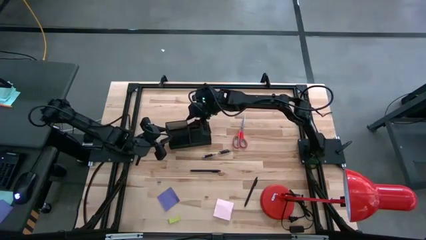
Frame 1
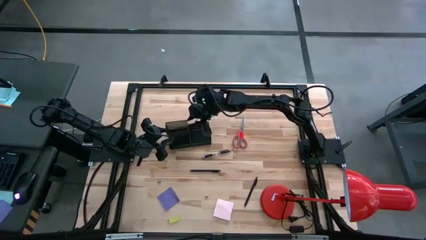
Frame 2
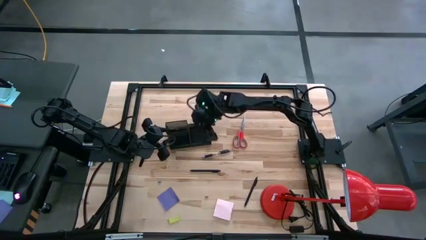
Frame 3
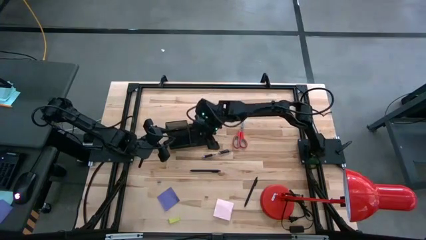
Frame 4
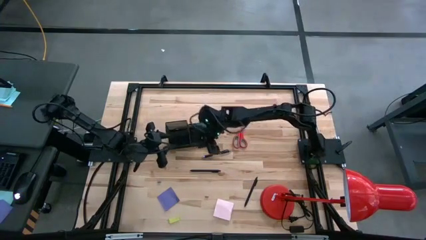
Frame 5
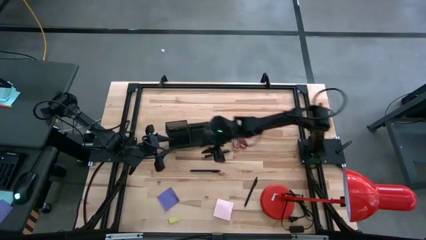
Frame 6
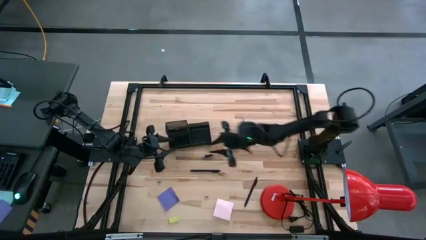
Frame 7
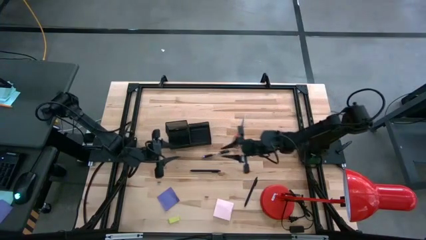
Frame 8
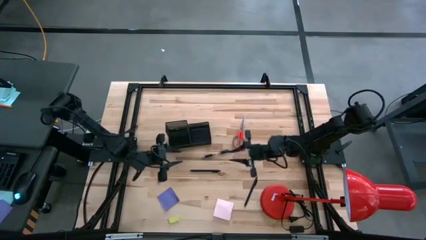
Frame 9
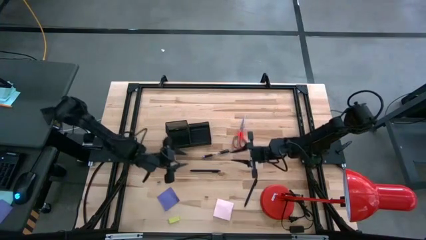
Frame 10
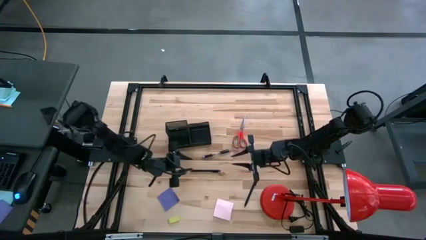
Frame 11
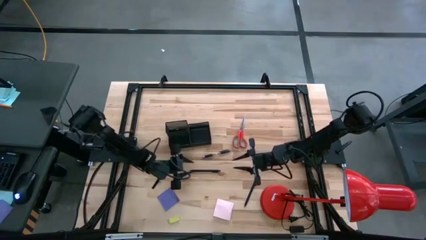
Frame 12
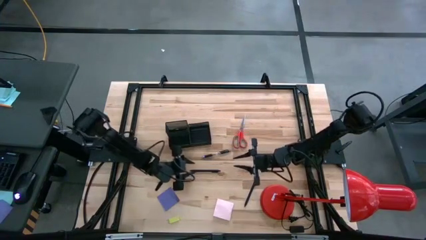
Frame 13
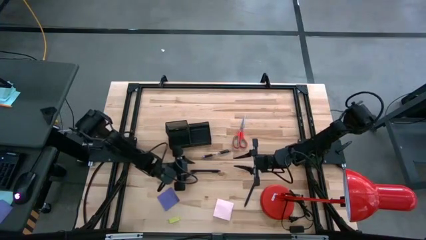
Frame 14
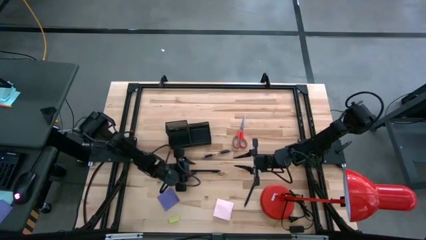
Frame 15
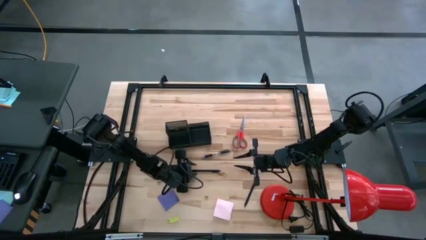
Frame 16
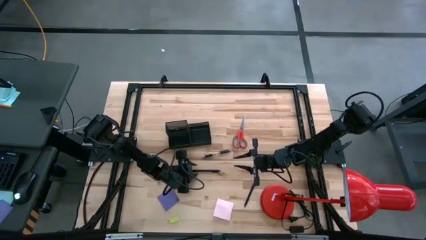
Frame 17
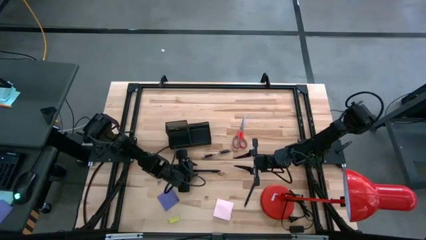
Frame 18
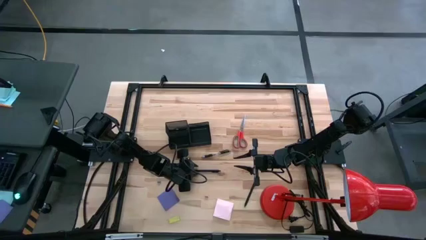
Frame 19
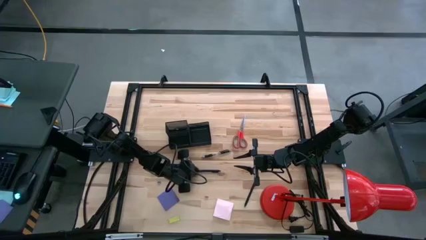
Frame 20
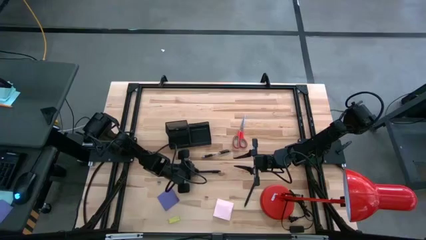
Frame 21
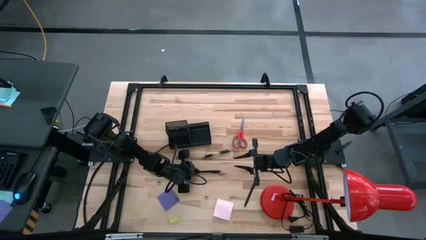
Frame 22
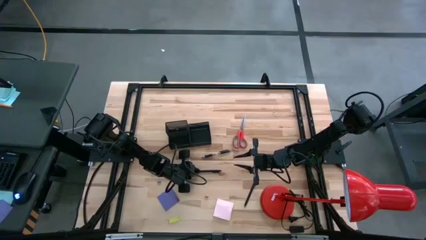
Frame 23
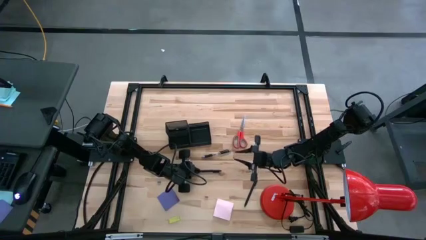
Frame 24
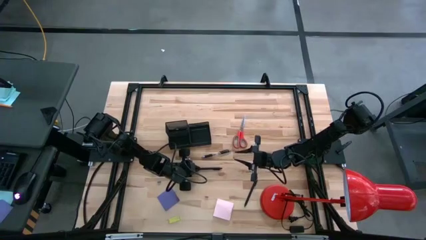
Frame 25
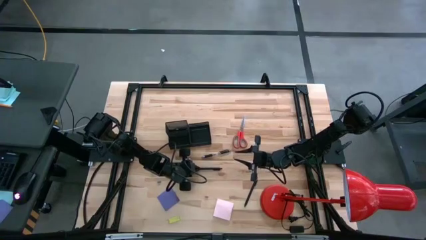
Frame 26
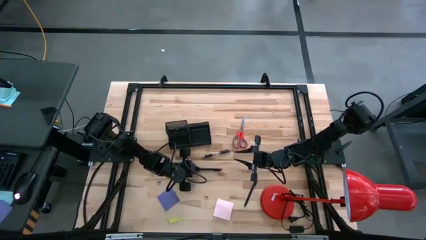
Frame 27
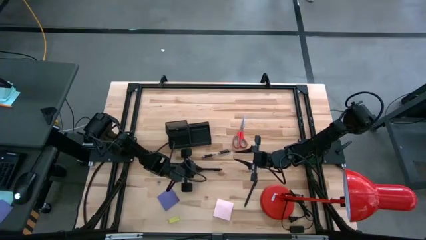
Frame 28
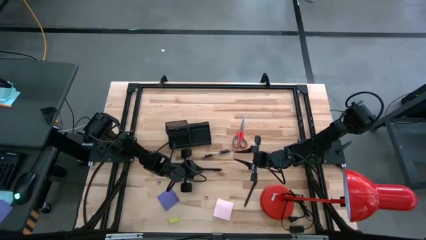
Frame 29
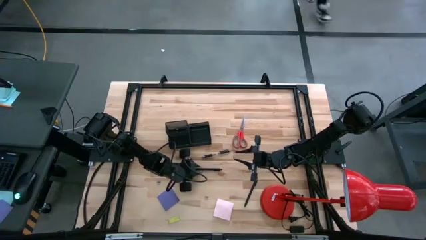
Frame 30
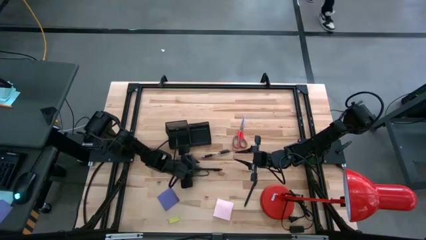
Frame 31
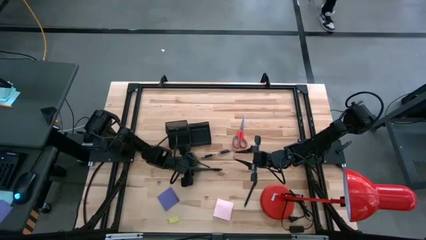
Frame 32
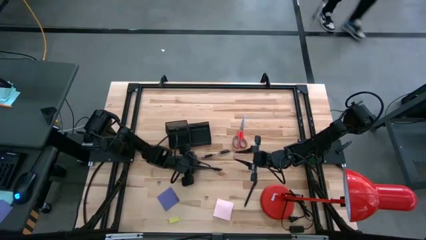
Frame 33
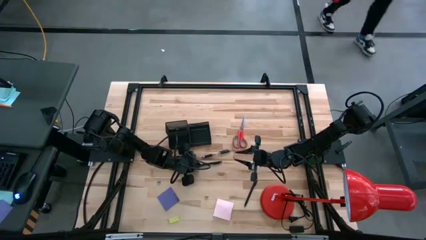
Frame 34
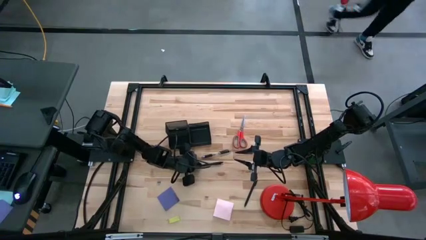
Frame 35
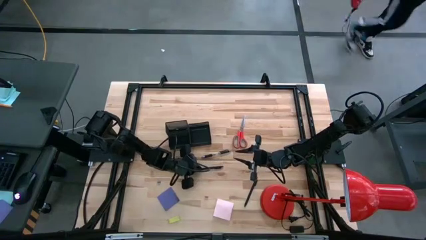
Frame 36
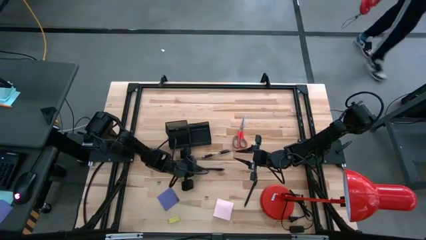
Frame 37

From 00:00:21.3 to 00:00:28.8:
Task: Pick and place office supplies into organizer
Put top pen black into the desk organizer

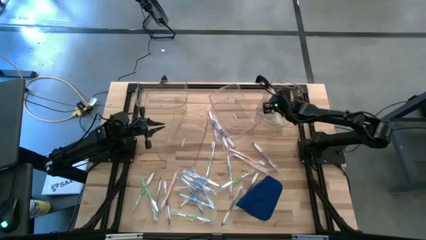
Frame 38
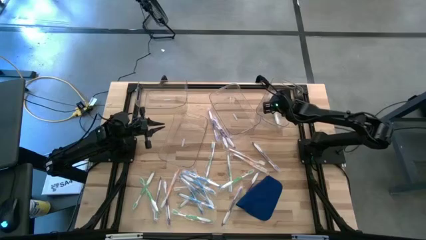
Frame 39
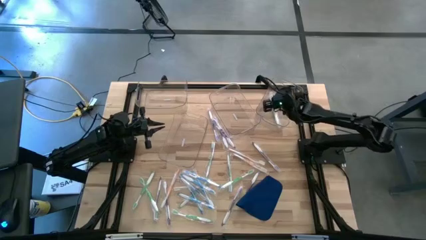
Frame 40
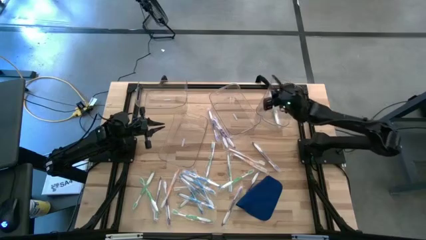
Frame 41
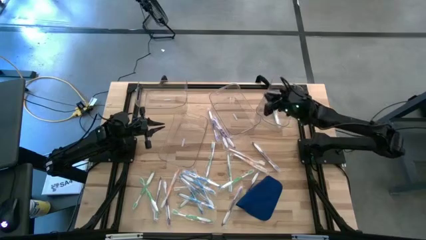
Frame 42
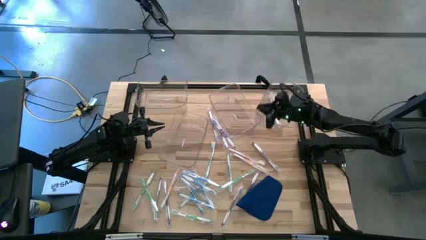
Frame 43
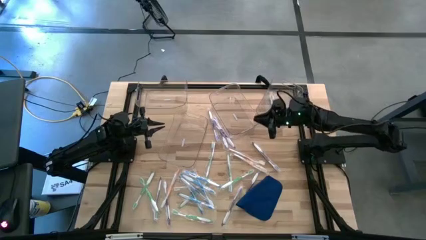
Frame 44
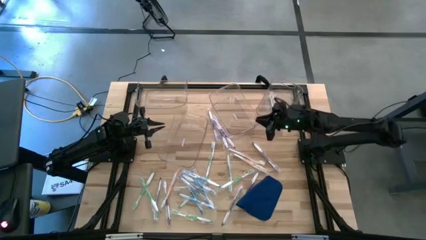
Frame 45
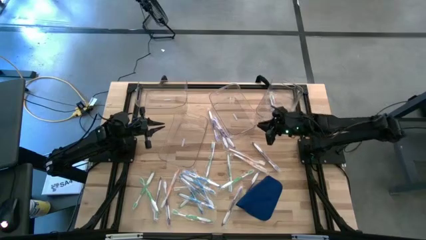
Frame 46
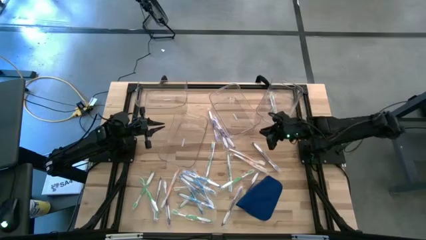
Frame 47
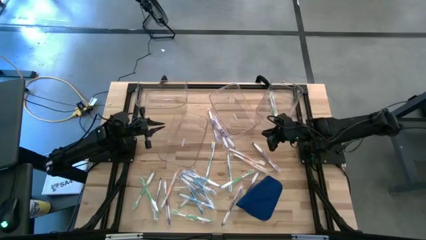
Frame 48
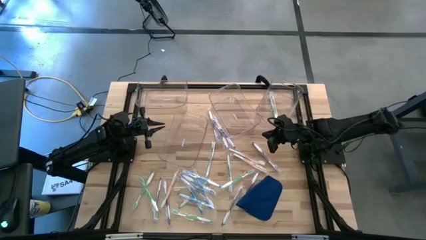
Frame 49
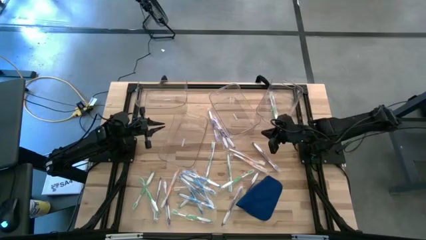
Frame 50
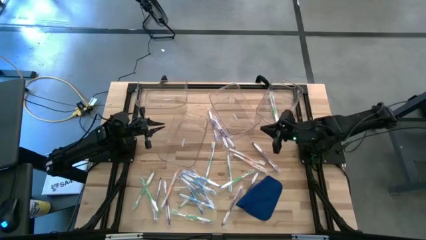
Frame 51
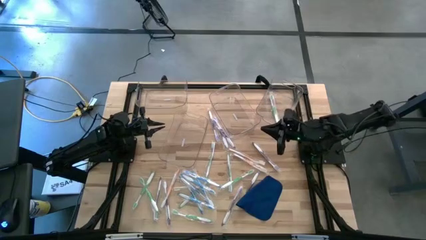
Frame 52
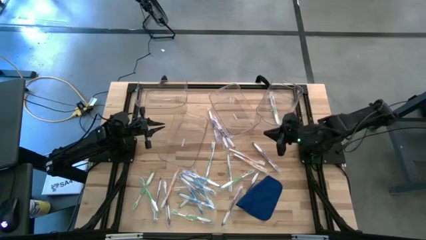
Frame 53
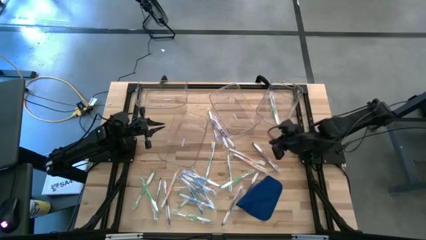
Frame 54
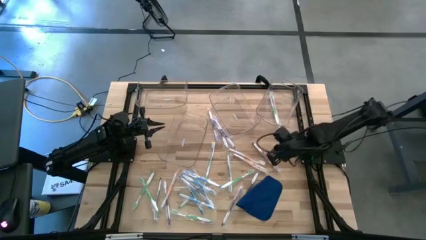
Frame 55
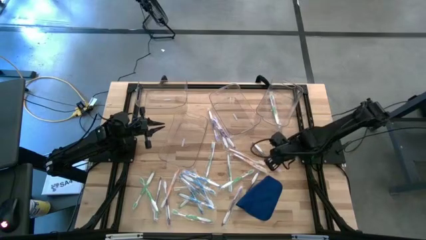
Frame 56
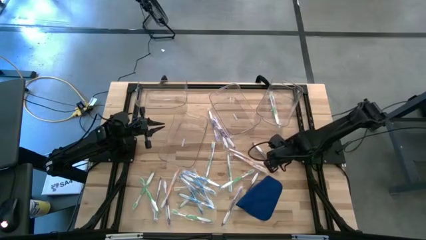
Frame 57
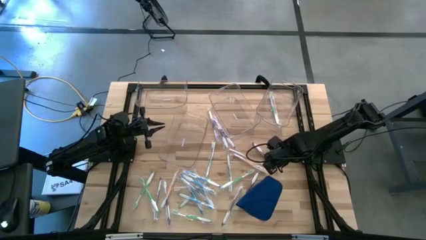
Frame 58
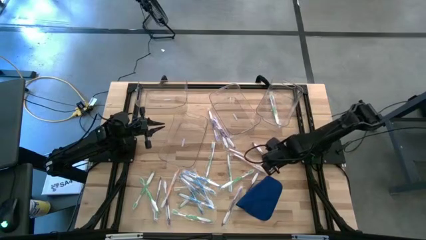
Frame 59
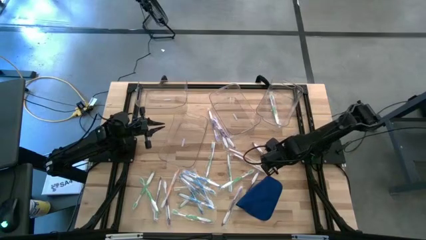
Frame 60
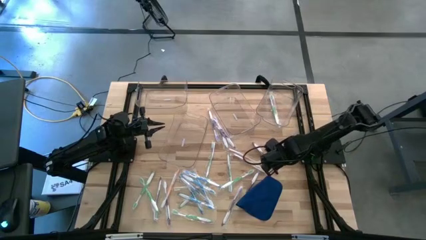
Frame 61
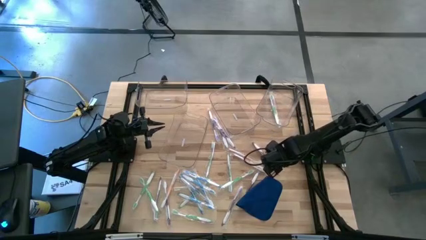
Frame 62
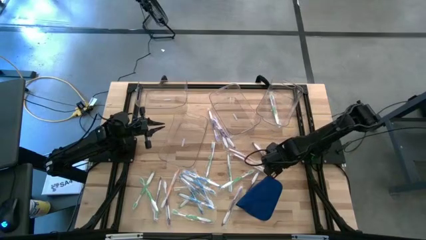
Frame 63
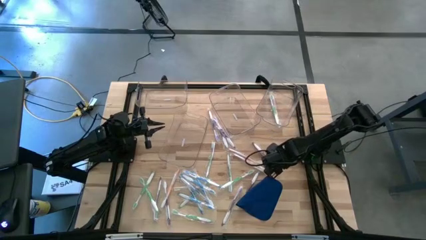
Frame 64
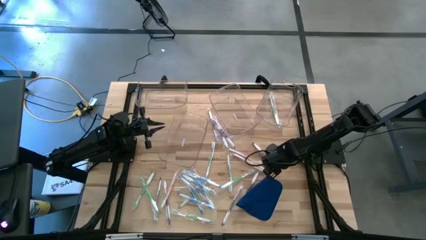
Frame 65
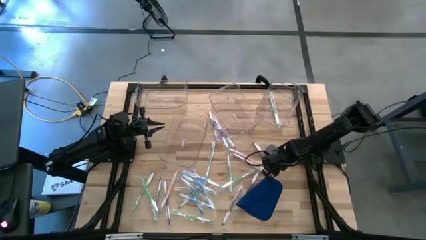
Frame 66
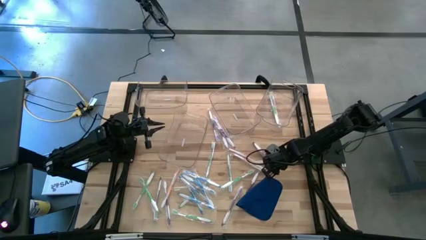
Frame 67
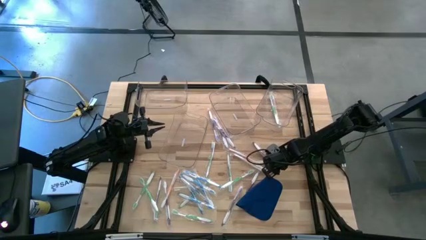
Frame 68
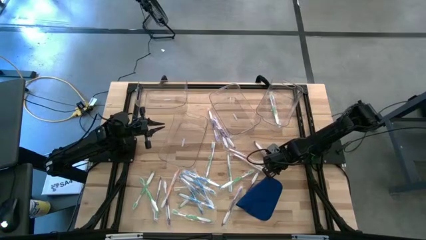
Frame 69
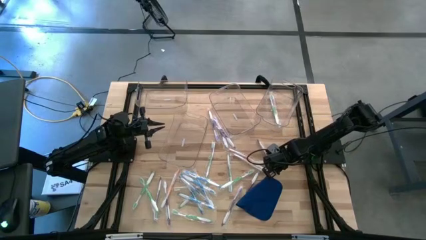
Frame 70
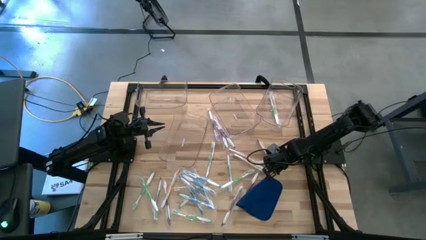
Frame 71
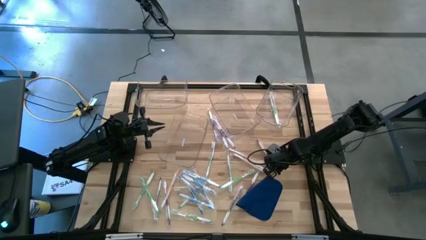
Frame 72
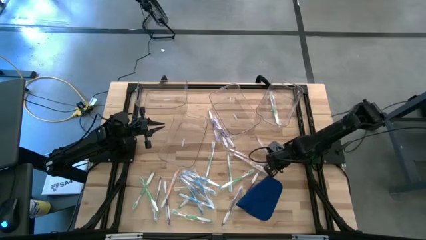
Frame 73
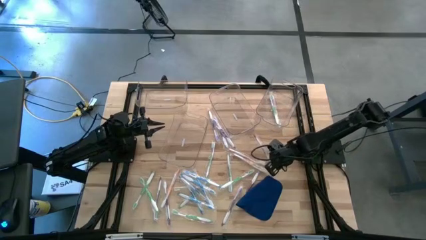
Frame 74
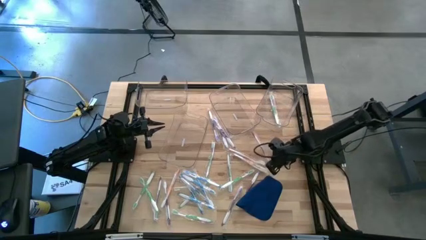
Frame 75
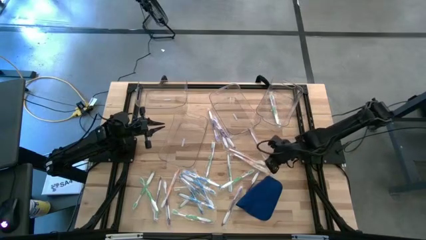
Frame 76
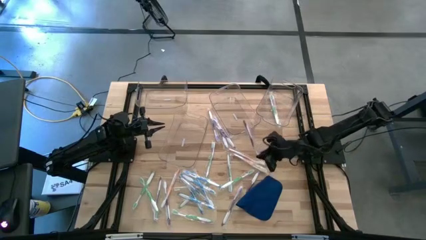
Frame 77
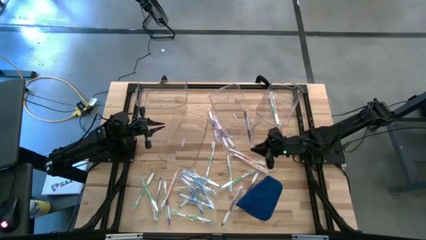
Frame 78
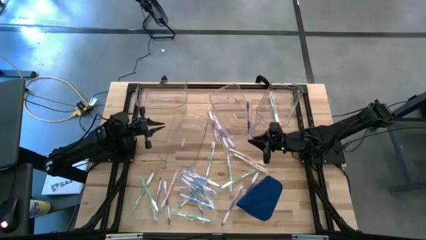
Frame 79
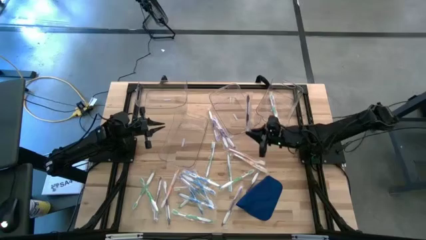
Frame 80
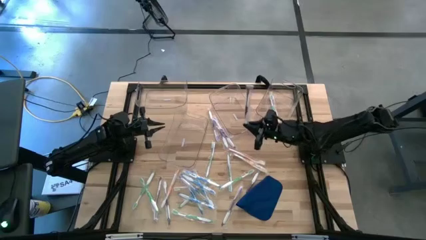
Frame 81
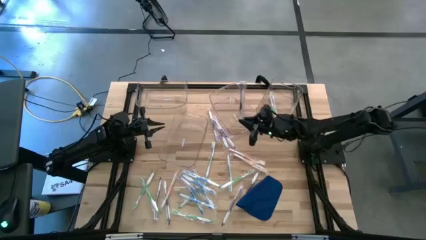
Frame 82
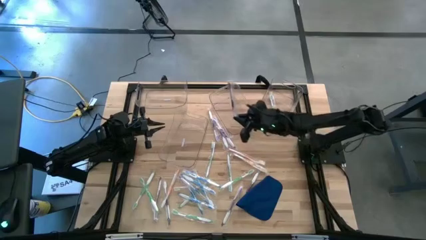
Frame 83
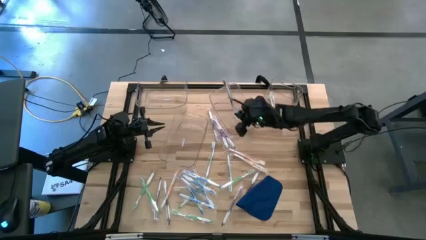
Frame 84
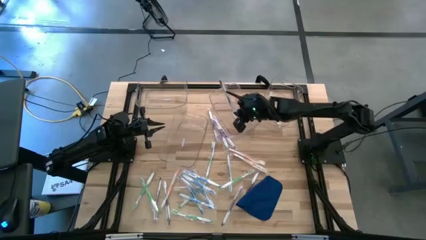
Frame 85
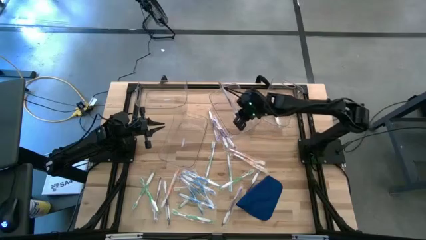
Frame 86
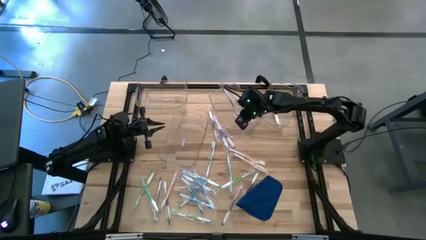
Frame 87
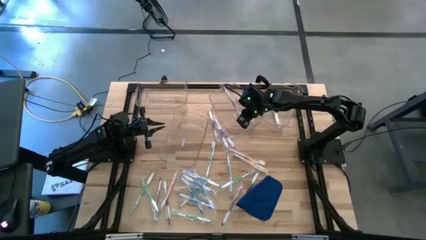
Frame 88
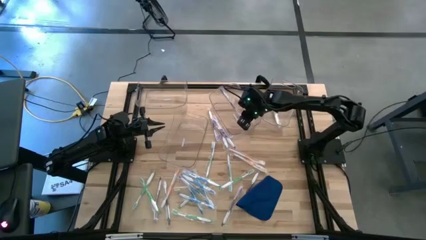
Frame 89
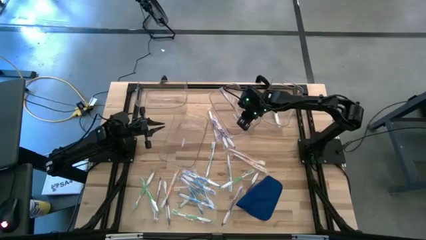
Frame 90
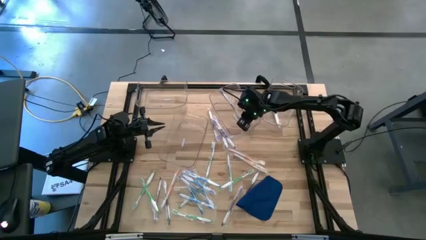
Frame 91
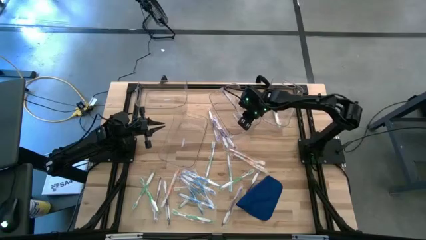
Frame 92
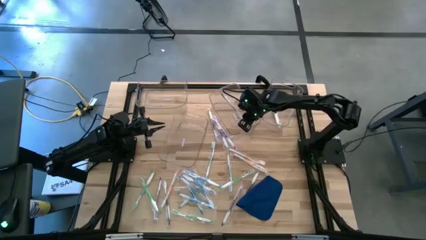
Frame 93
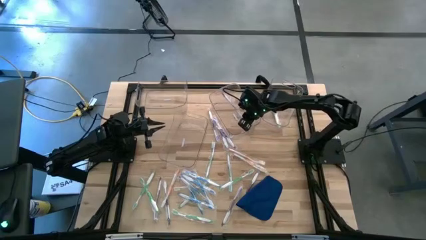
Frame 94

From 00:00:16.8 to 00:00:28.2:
Task: Pick & Place Toothbrushes
Put the purple toothbrush into the top center transparent bin
